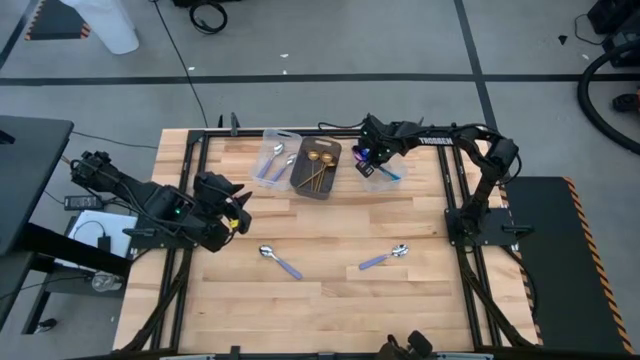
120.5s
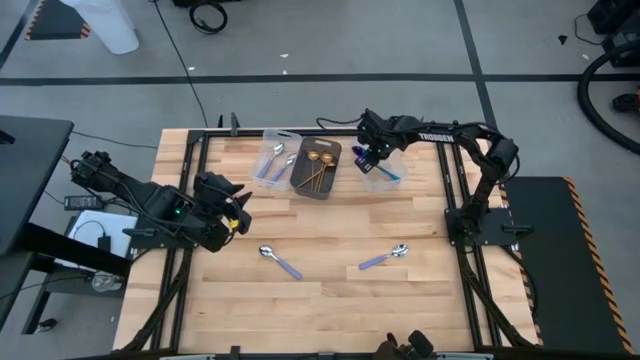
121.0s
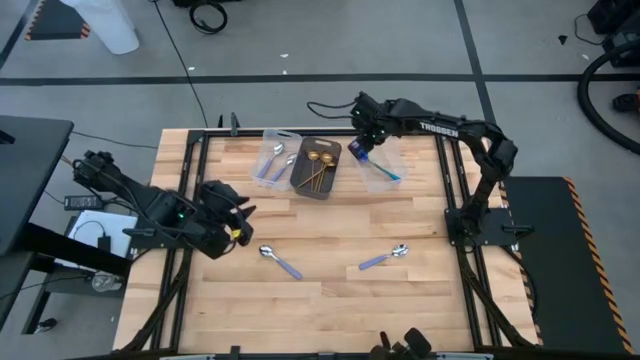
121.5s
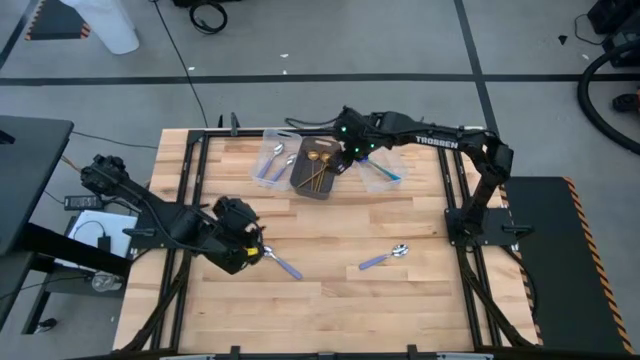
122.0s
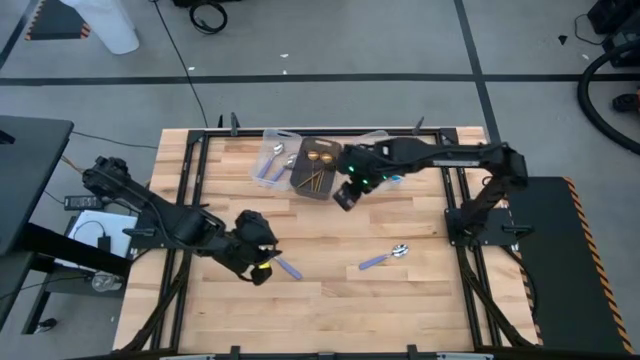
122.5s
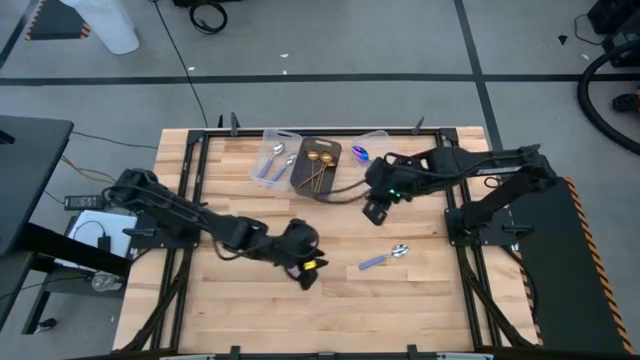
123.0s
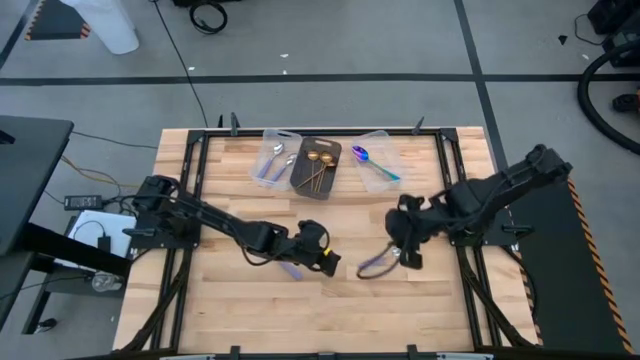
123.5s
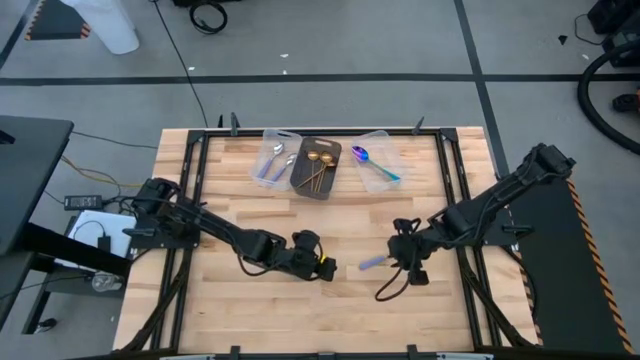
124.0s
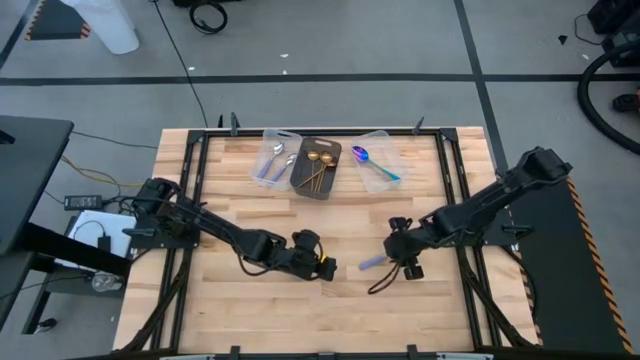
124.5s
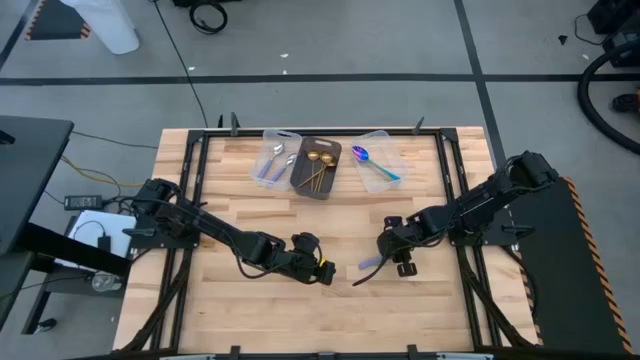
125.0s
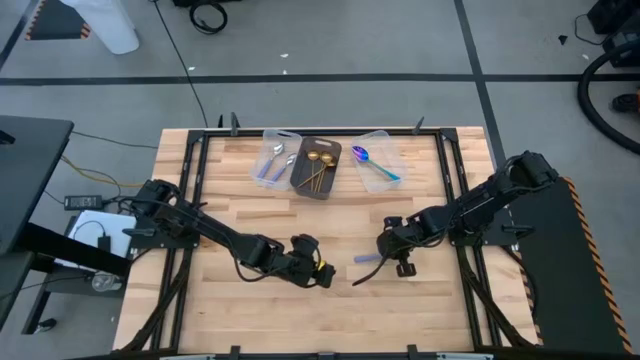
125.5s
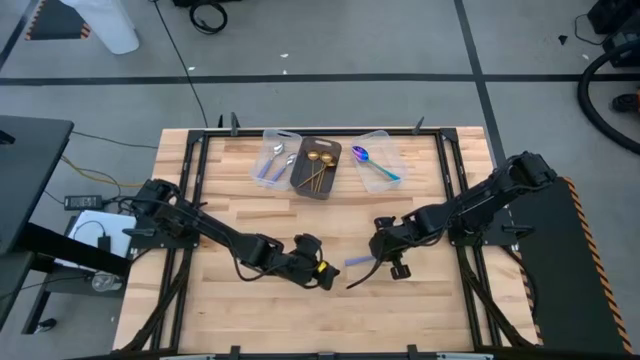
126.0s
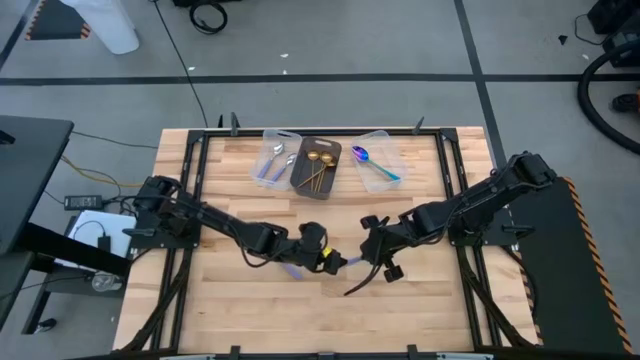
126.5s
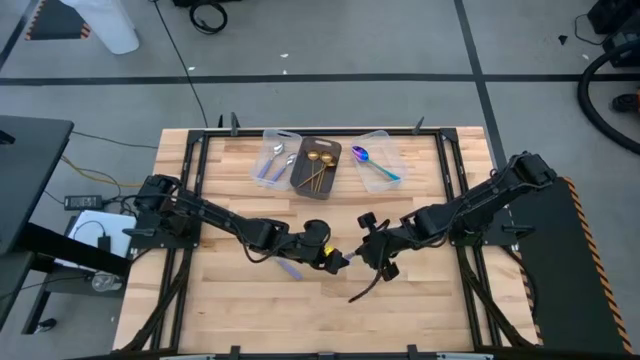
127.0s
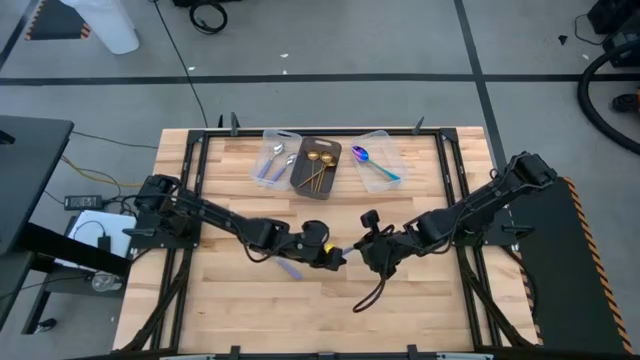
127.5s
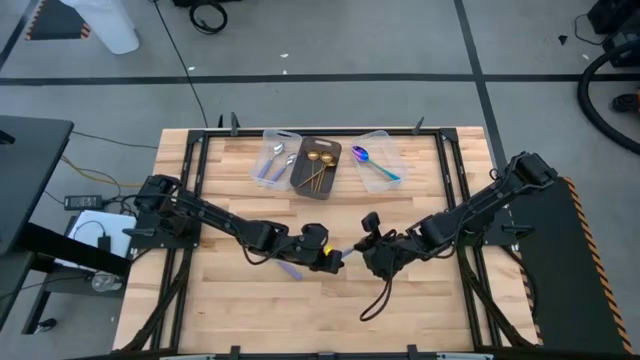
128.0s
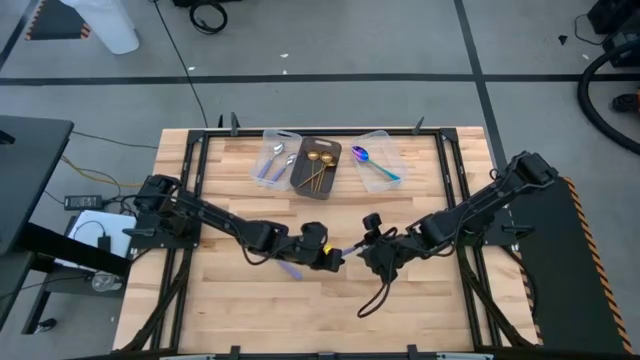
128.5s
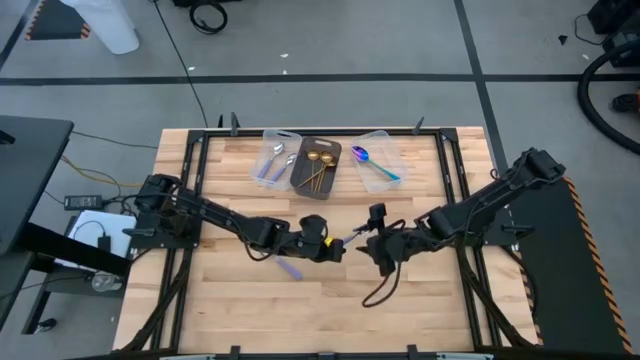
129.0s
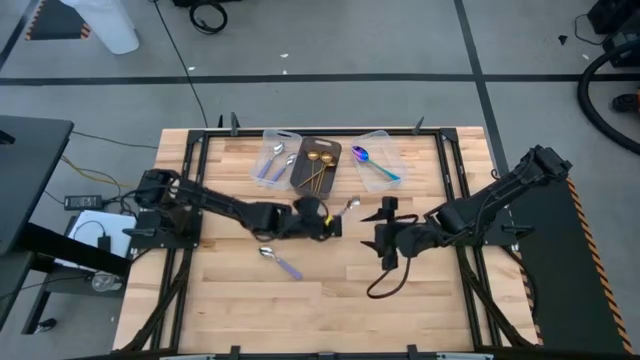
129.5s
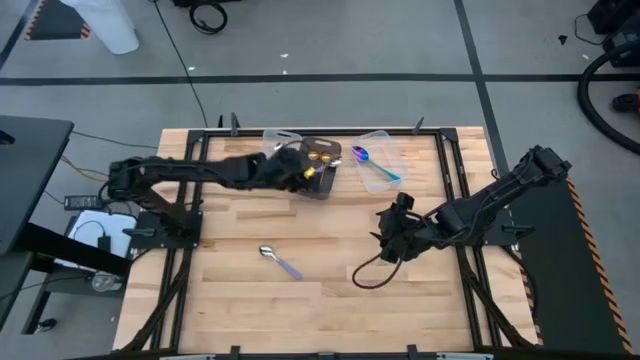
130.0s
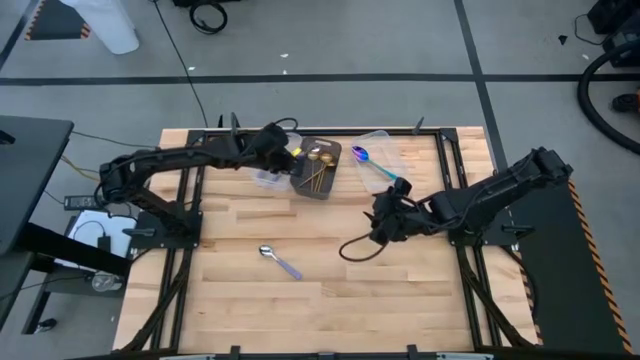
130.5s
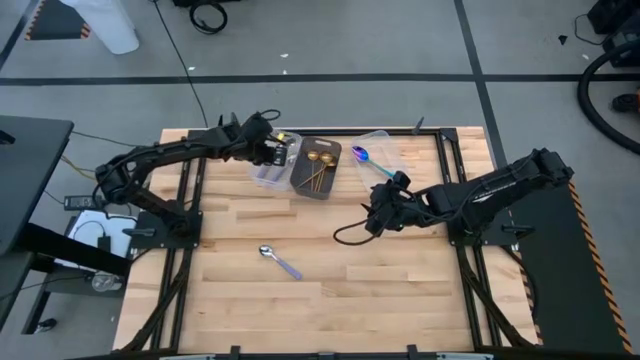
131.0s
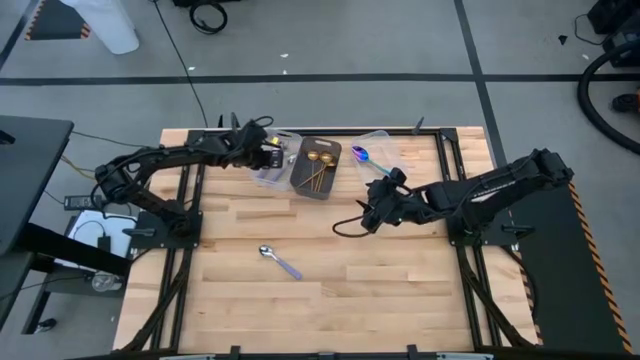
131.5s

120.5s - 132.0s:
Task: Sort silverware by color (type)
Put the right purple spoon into the left transparent bin

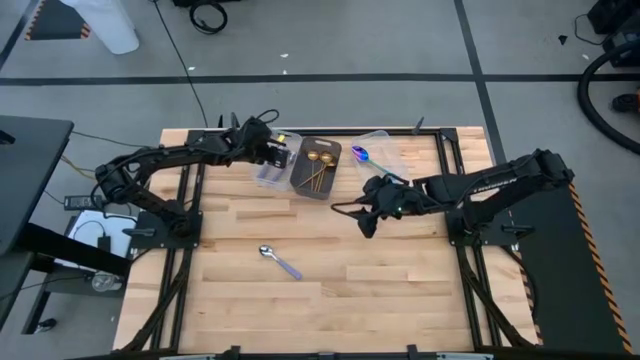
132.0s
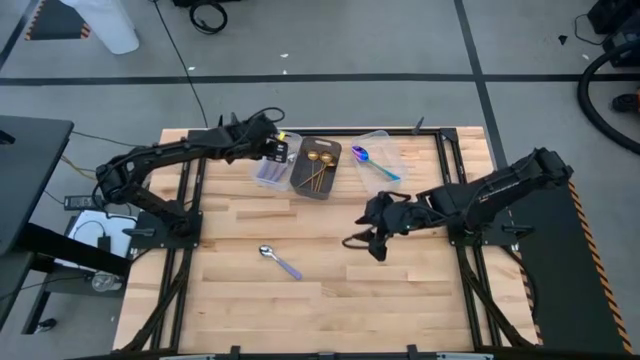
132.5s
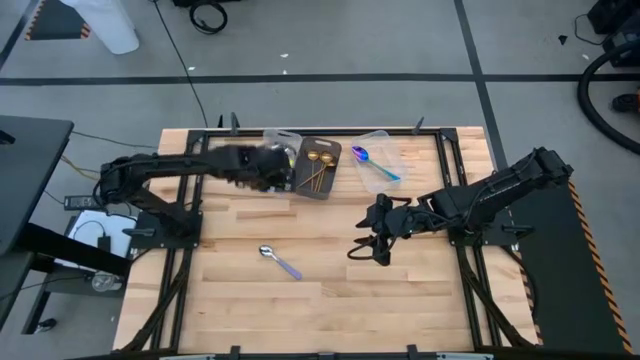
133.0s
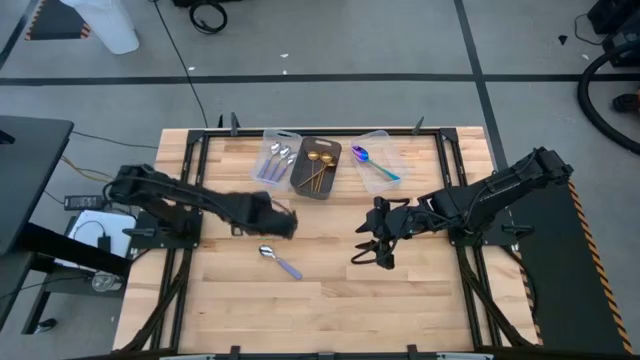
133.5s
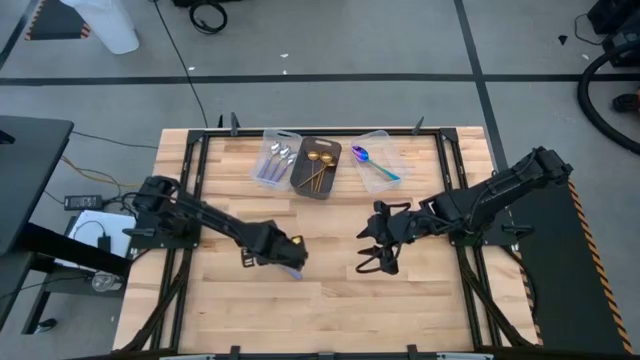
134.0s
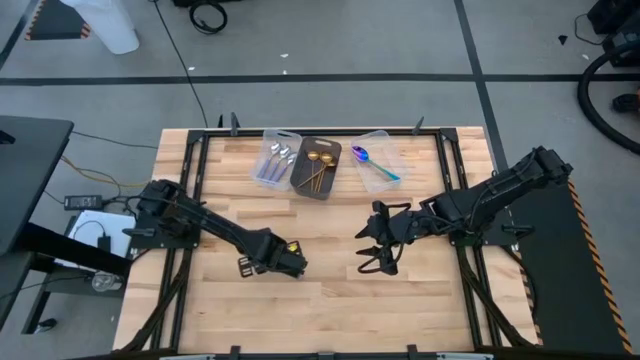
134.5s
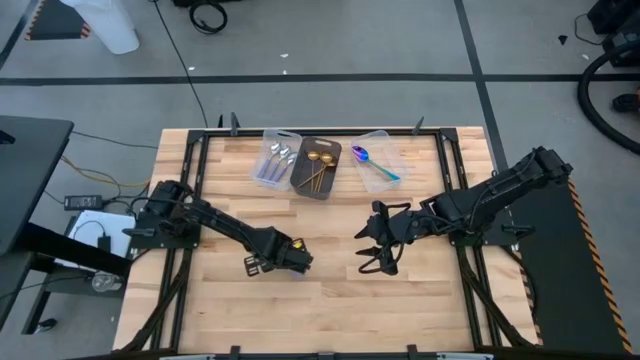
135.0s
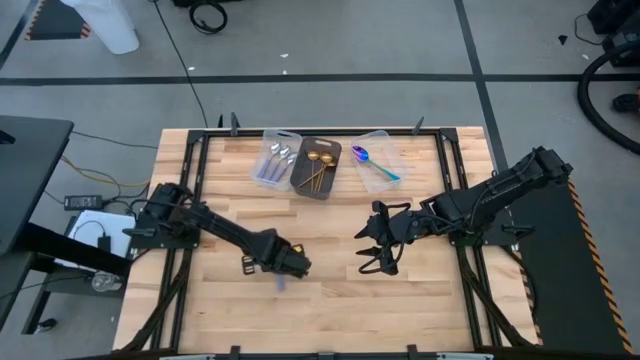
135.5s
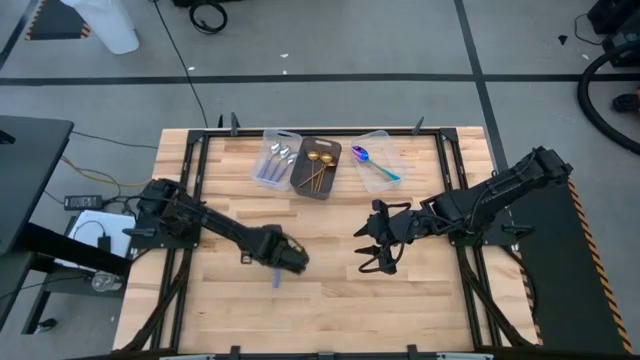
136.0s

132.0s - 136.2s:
Put the purple spoon into the left transparent bin

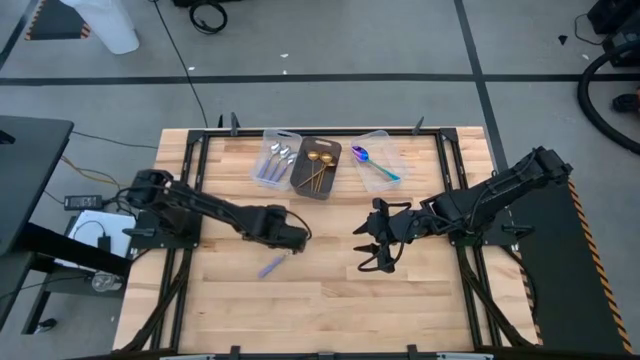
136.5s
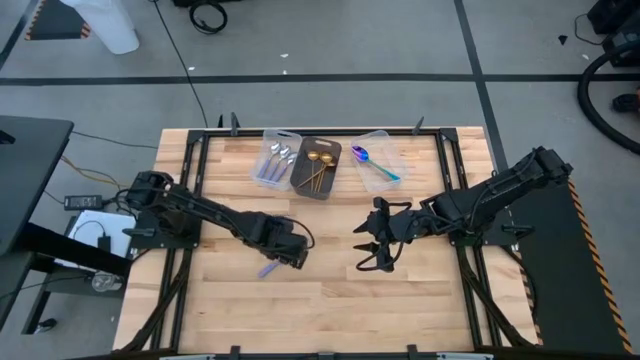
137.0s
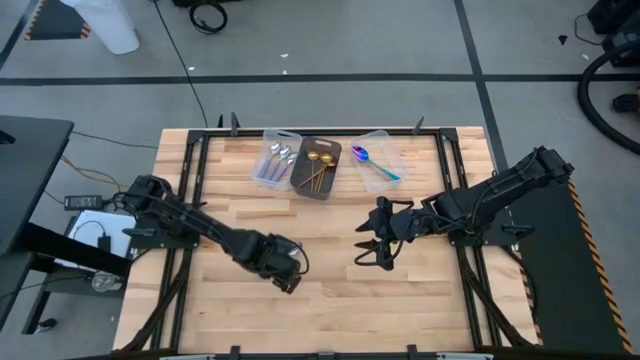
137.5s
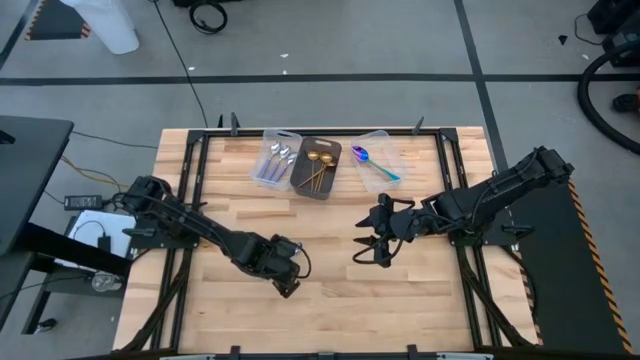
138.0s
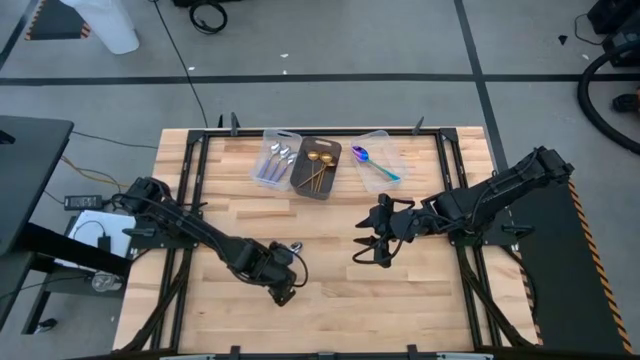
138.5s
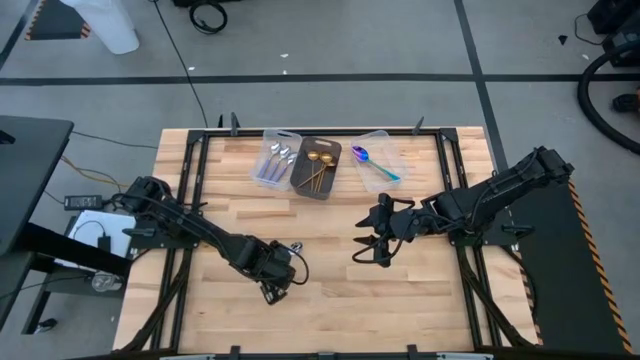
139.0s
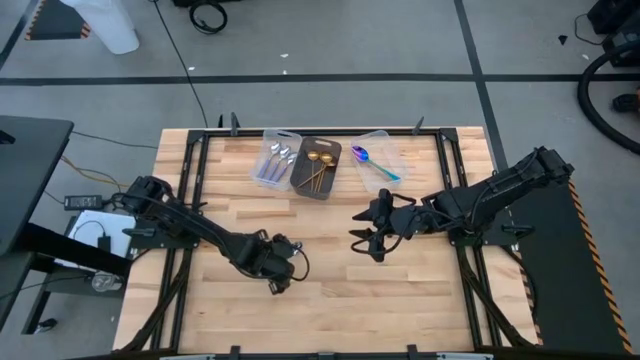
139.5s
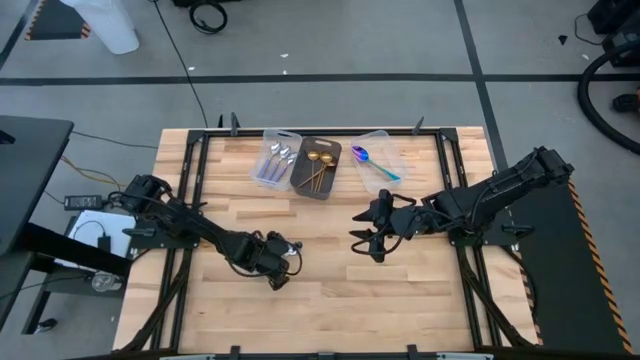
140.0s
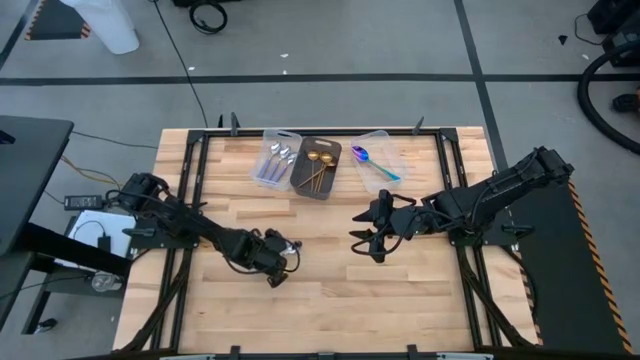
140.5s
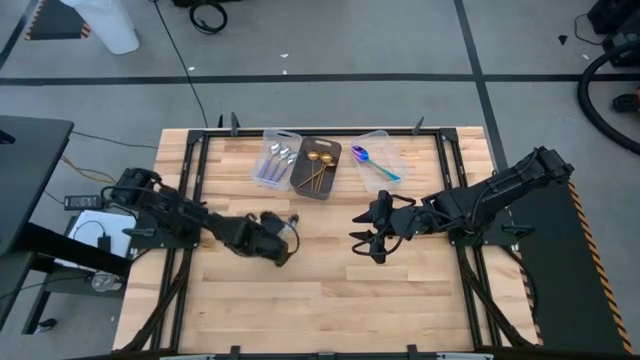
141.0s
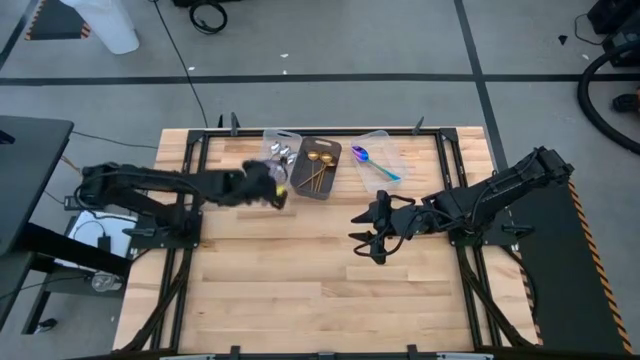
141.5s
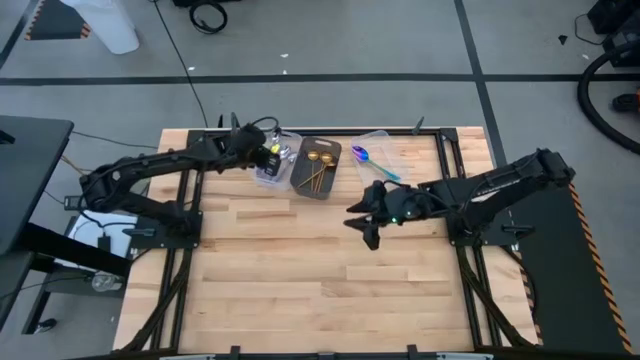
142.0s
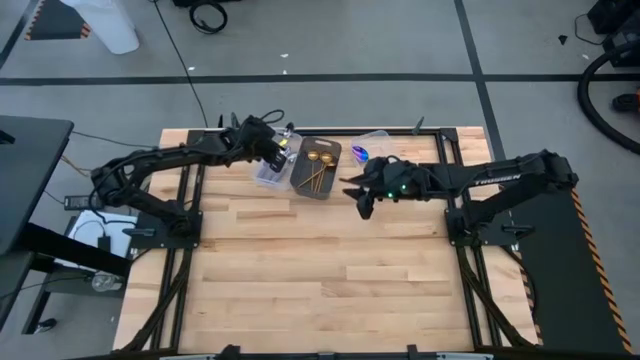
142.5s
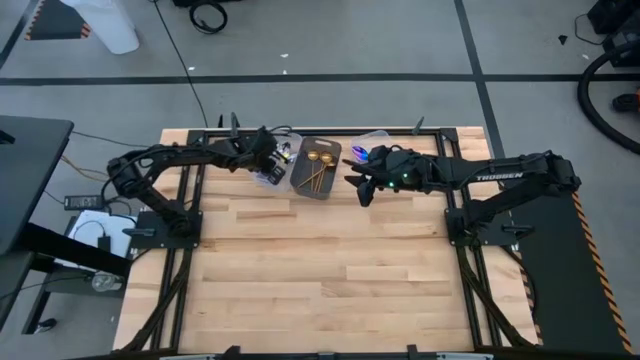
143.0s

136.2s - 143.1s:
Put the purple spoon into the left transparent bin
